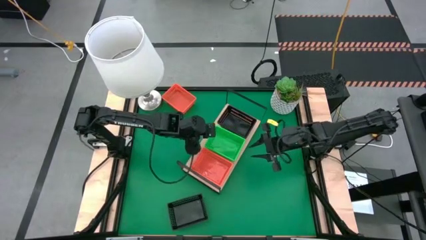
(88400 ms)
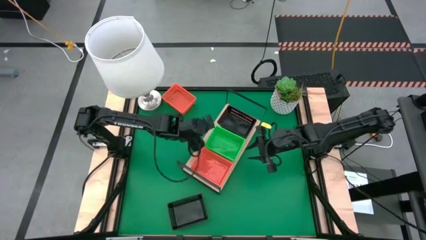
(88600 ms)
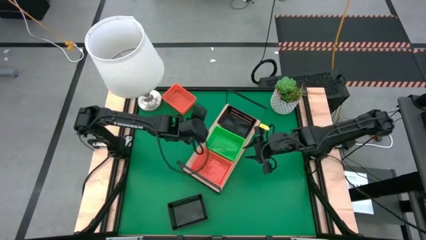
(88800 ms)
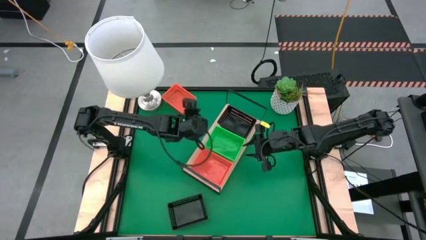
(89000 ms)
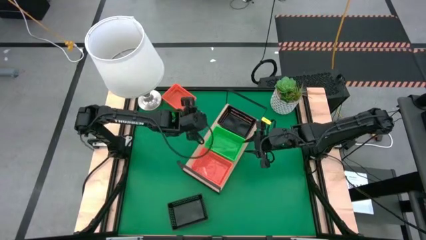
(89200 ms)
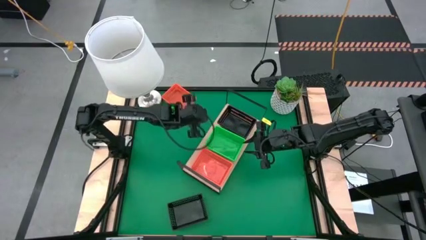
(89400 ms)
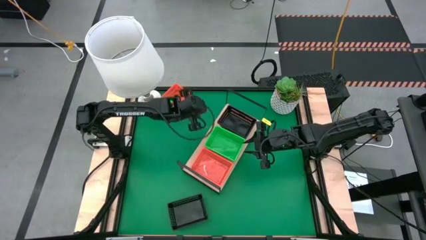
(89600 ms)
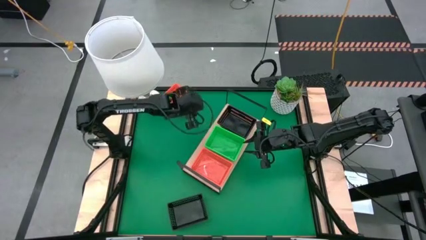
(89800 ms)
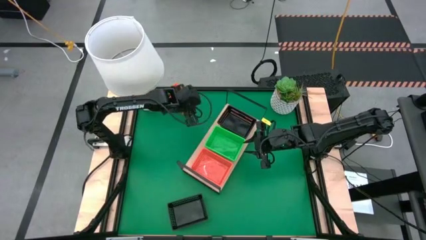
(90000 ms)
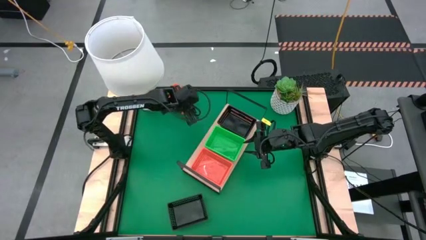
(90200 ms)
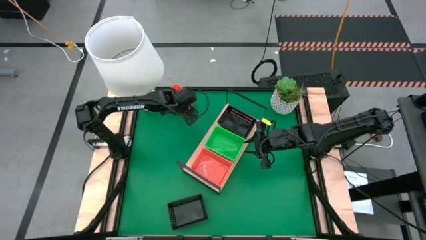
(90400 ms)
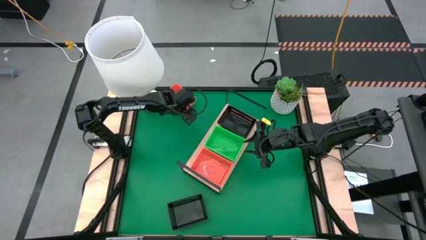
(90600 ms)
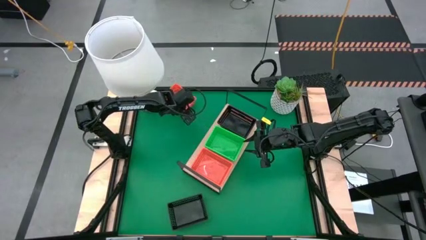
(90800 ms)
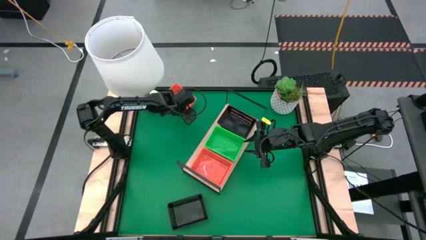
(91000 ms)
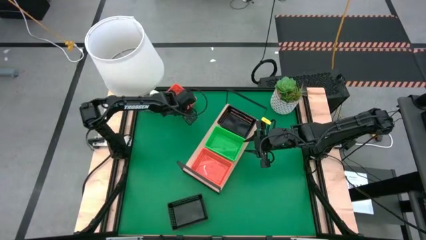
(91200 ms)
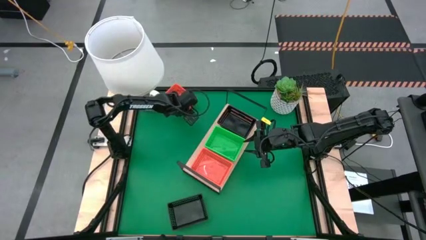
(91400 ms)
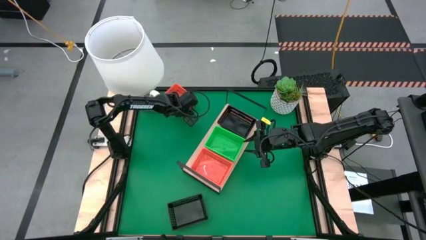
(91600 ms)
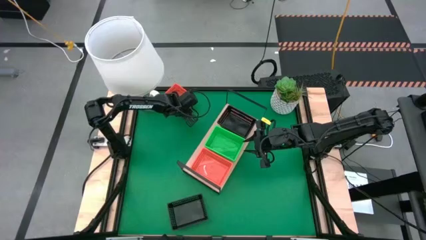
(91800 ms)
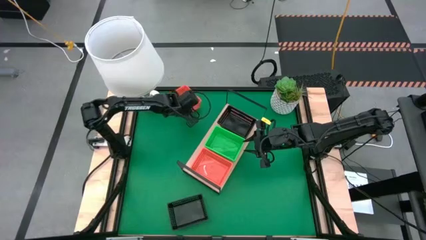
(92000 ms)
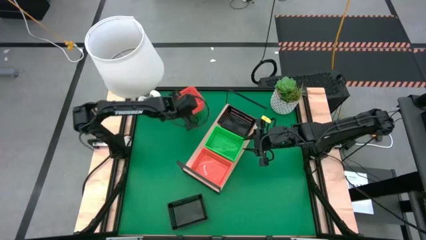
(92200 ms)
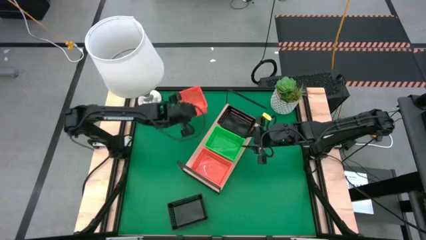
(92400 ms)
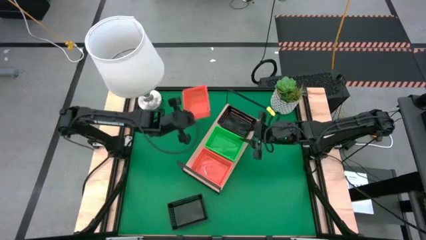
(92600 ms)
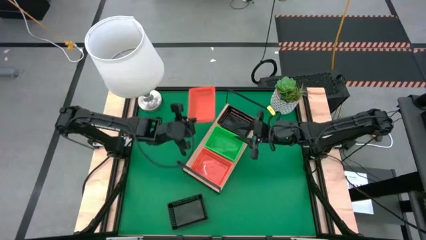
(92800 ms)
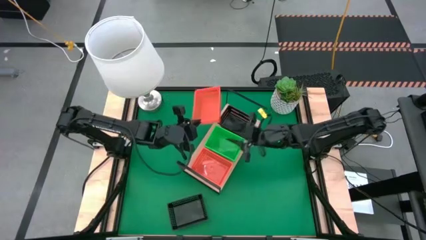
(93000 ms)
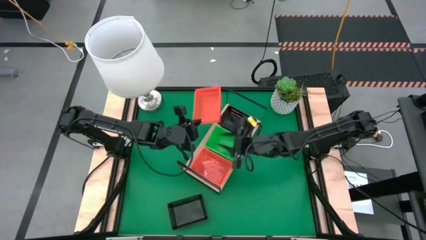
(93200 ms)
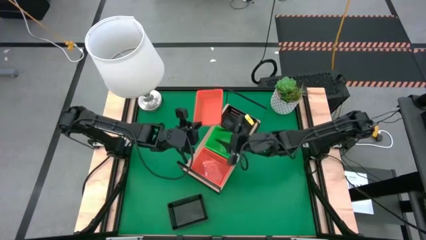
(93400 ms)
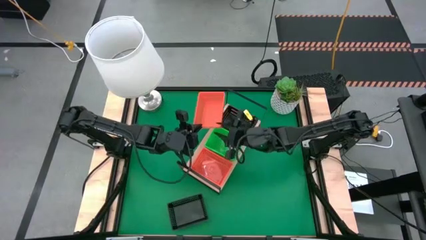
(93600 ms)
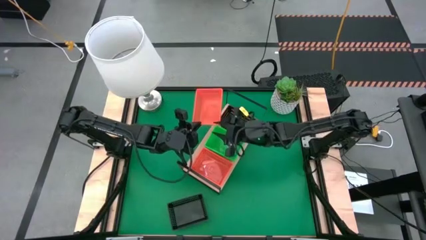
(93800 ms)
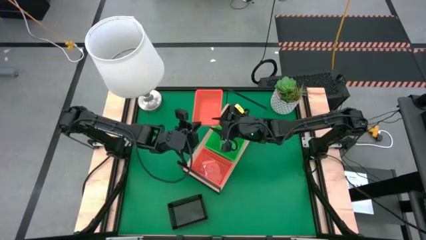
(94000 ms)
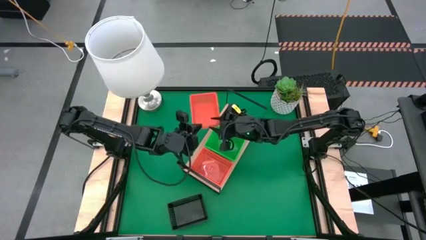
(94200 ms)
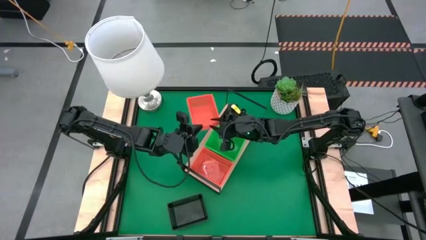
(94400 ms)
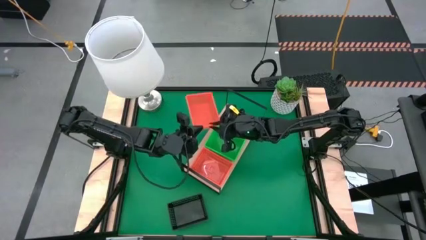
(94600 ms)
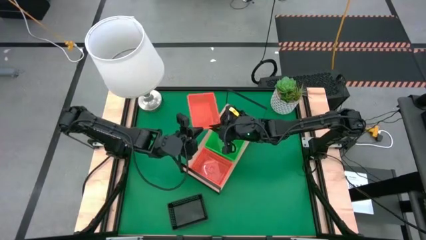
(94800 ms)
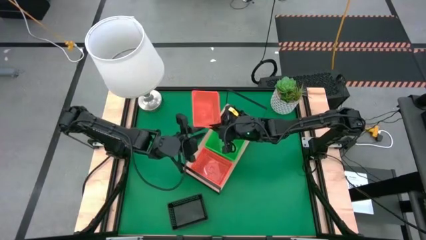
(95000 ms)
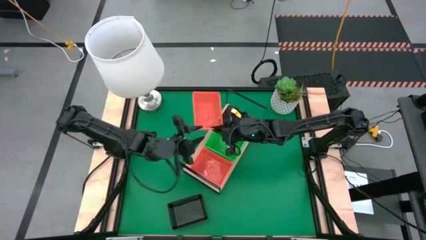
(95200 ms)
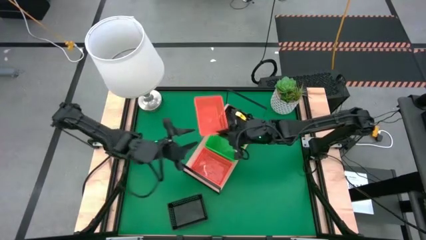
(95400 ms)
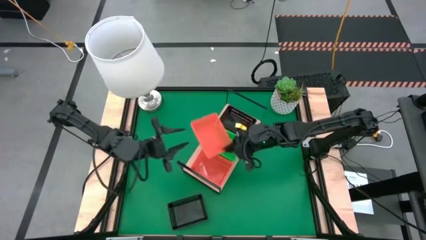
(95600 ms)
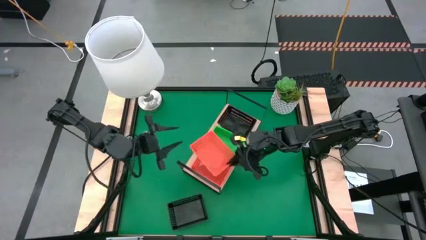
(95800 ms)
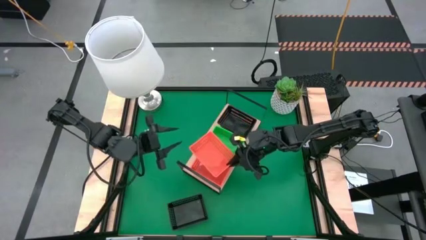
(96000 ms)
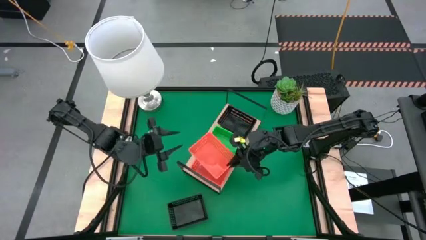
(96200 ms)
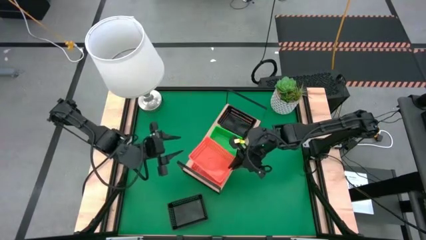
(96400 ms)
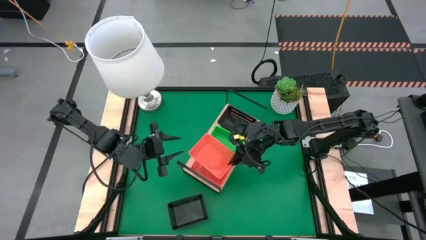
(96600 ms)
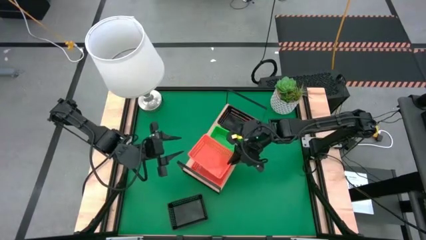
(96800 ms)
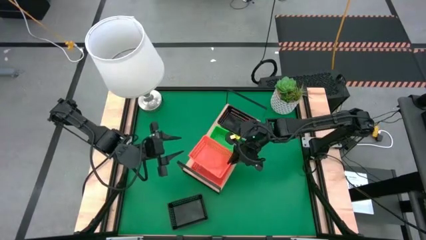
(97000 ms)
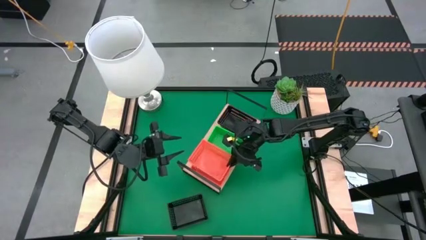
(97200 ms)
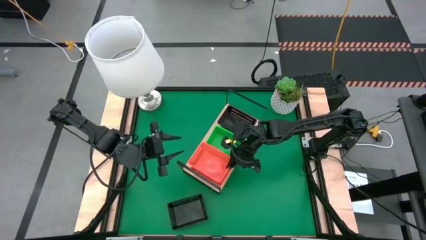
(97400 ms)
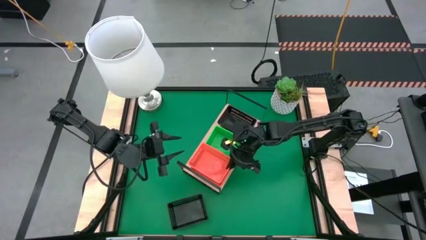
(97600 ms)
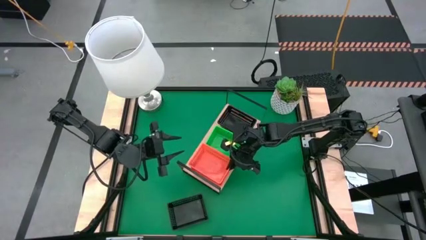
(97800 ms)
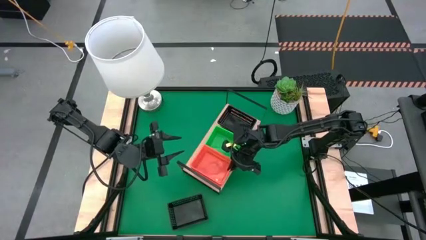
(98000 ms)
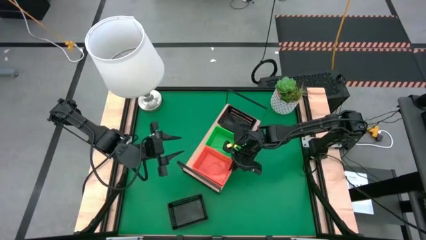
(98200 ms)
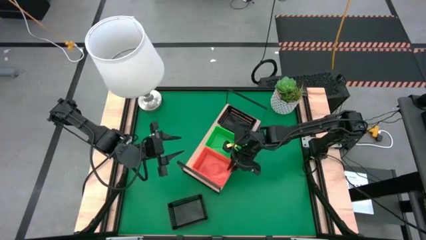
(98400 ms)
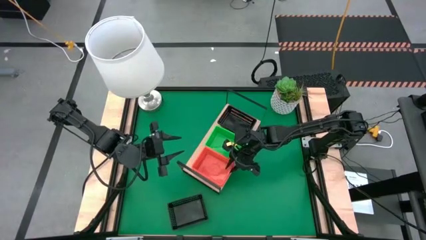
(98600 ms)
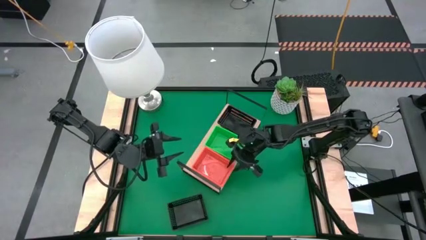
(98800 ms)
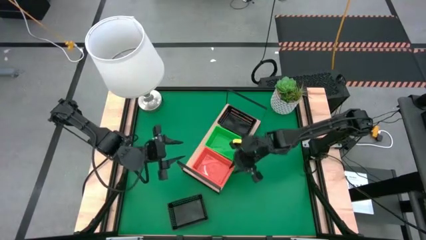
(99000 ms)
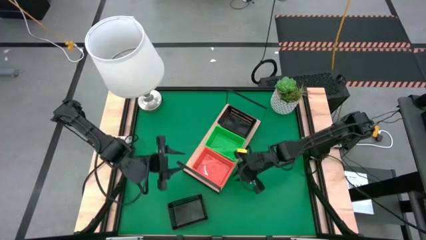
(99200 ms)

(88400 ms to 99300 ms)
Task: Stack baskets on shelf by color
Stack the orange bin into the stacked orange bin on the shelf

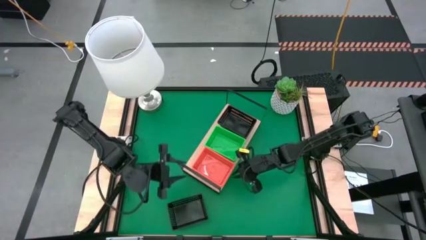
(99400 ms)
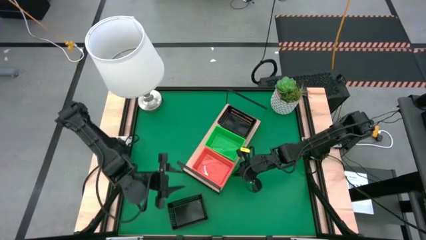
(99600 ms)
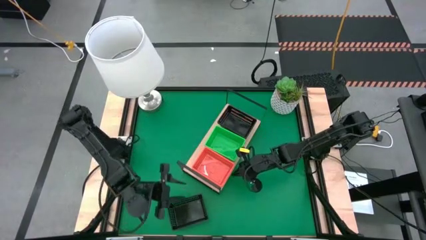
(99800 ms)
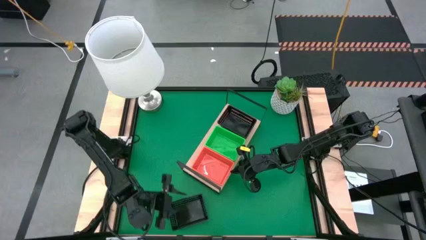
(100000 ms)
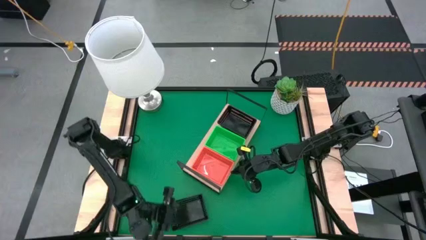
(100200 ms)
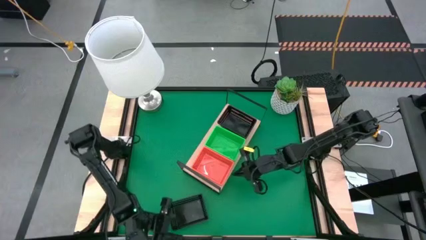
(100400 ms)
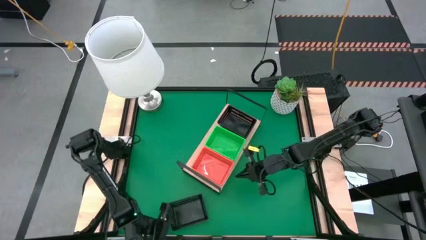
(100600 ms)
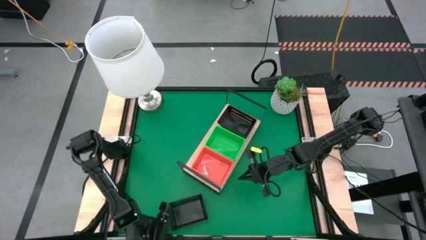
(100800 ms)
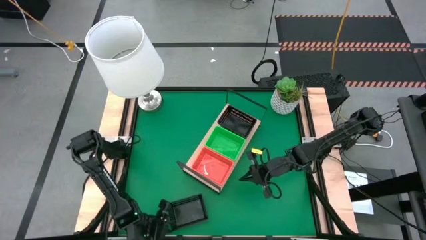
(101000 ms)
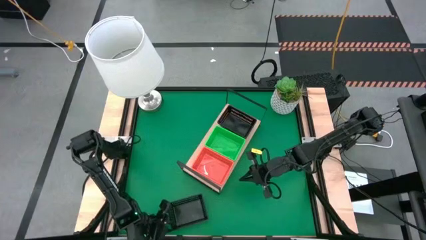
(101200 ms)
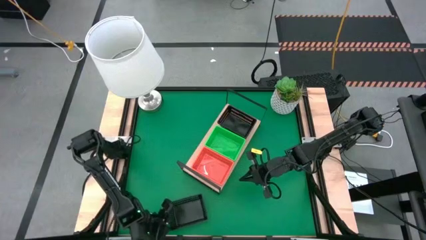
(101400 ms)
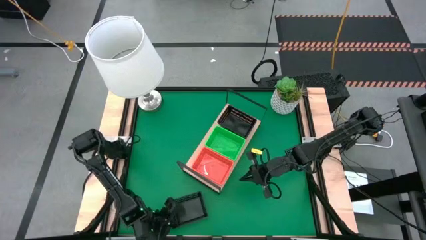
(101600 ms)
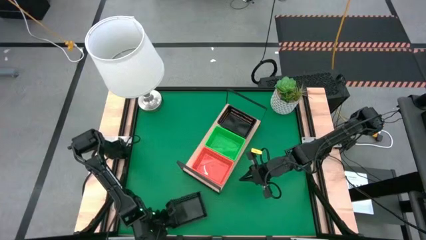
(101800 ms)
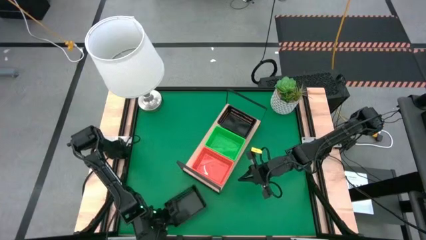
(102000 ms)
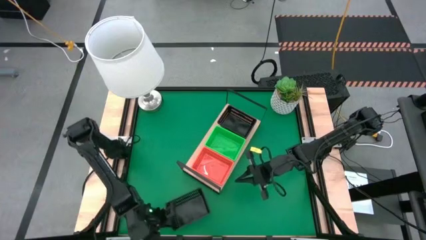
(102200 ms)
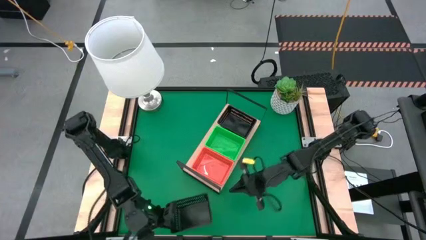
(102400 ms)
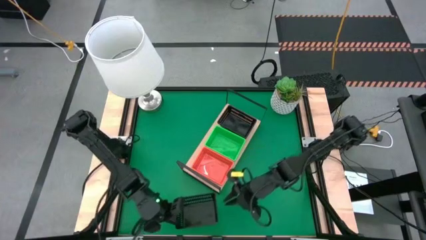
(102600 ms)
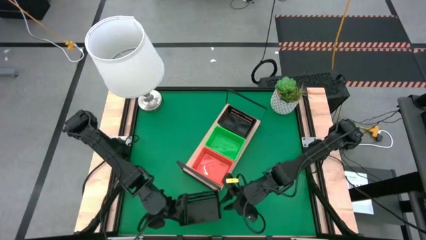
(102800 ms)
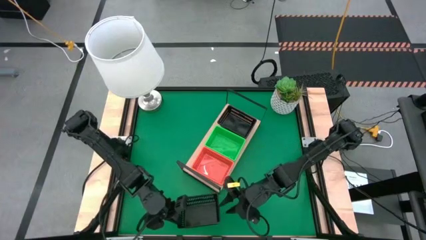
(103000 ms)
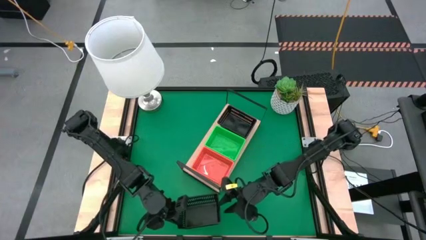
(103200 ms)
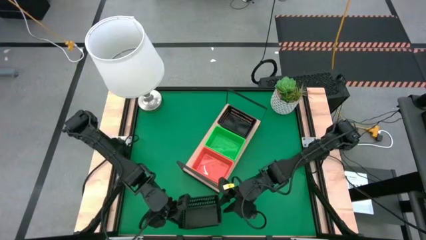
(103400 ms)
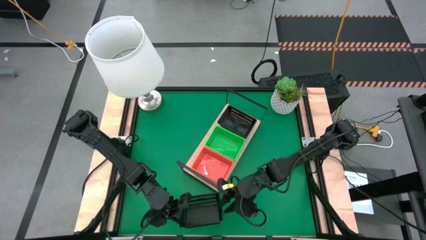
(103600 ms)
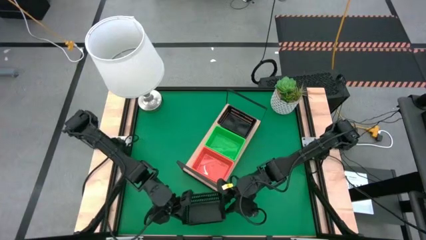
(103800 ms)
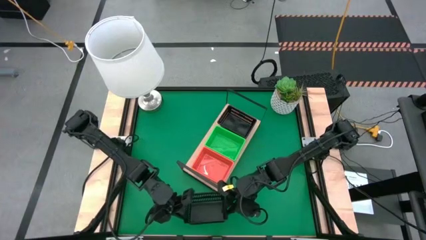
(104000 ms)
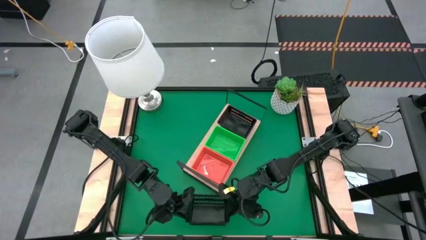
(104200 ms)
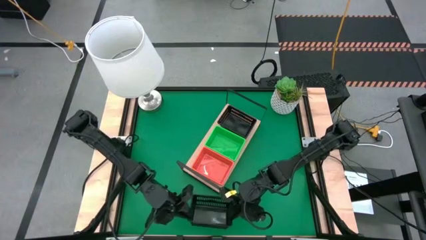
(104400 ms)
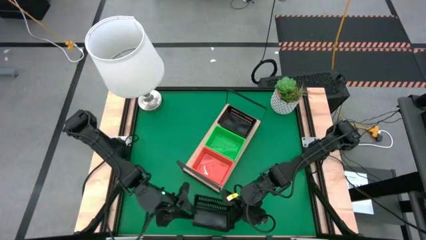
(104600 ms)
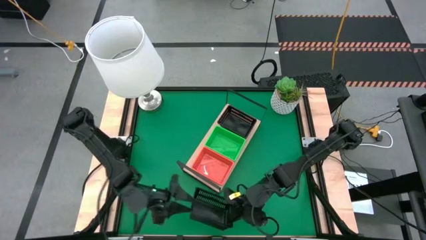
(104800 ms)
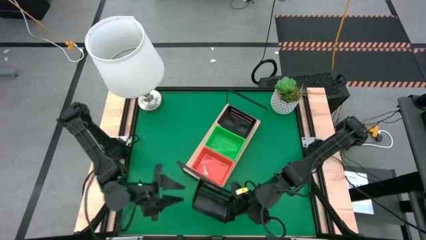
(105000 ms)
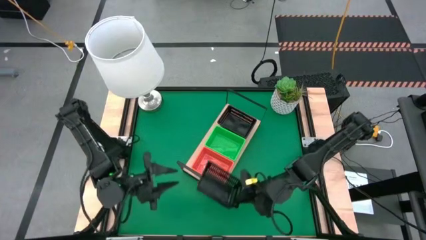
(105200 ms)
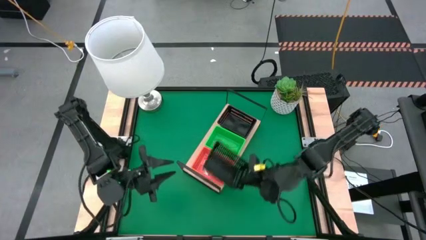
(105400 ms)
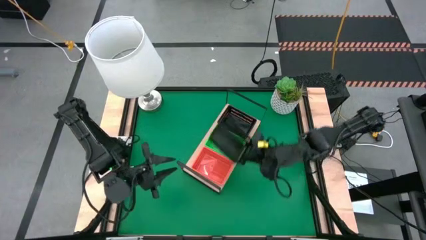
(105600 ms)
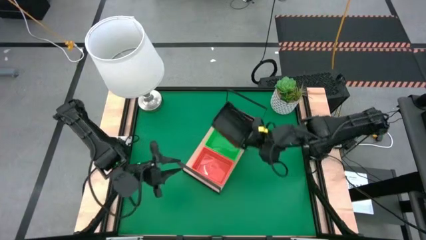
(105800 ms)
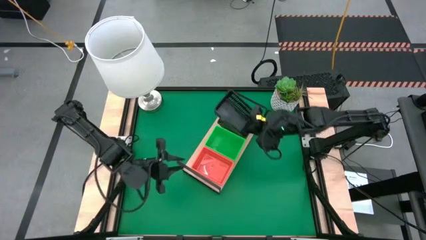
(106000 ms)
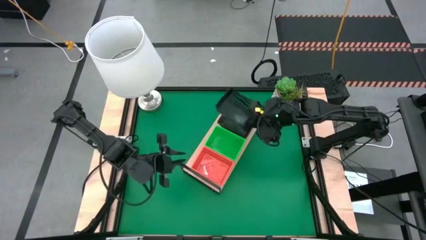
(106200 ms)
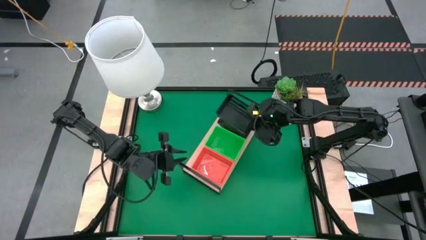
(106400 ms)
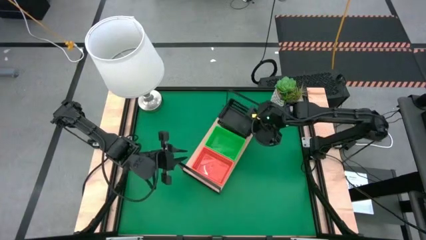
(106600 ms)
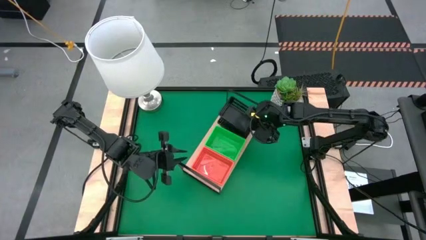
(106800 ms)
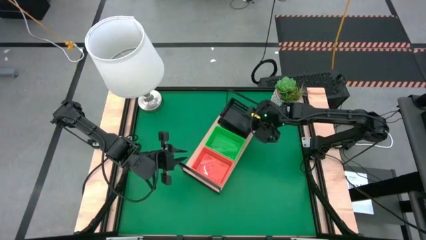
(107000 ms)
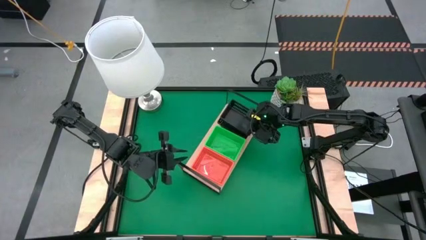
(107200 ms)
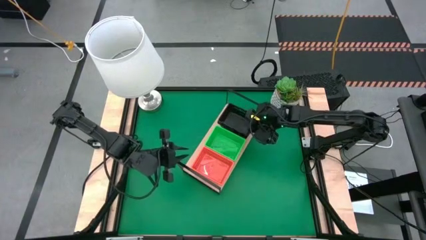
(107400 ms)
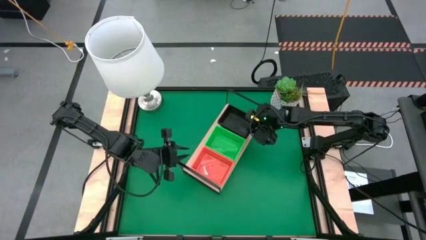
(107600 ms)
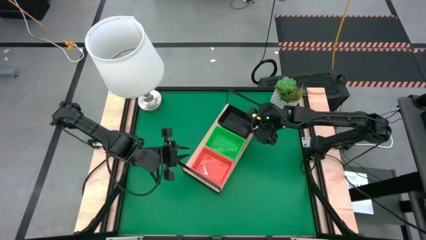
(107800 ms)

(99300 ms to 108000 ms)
Stack the black bin into the stacked black bin on the shelf
